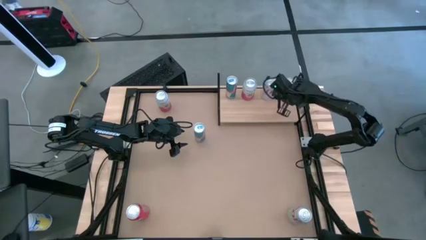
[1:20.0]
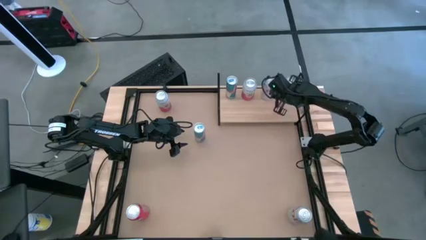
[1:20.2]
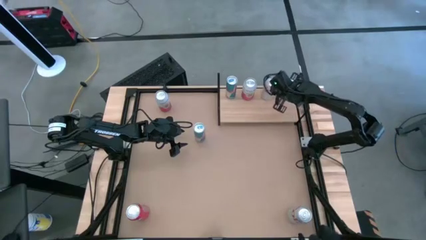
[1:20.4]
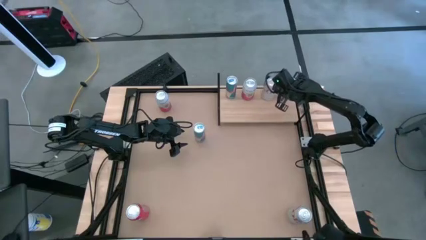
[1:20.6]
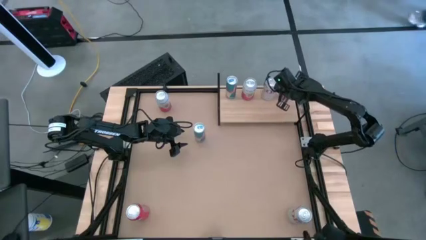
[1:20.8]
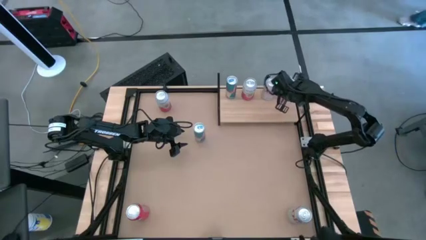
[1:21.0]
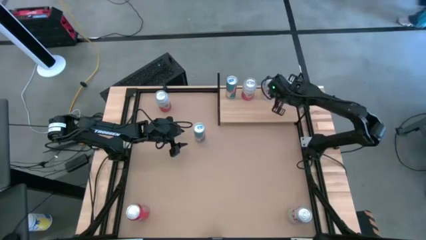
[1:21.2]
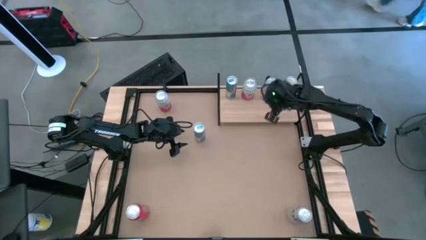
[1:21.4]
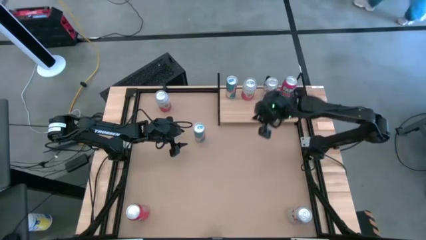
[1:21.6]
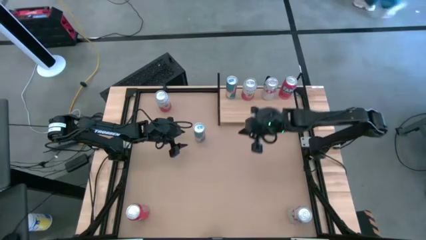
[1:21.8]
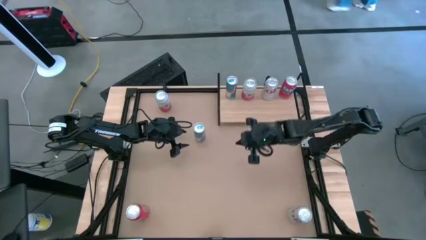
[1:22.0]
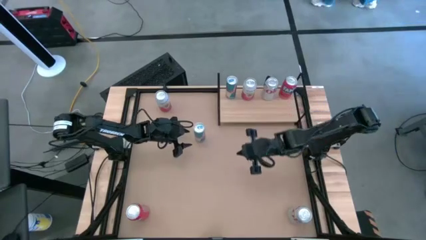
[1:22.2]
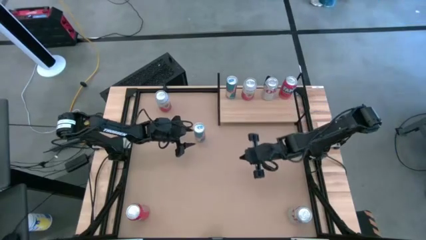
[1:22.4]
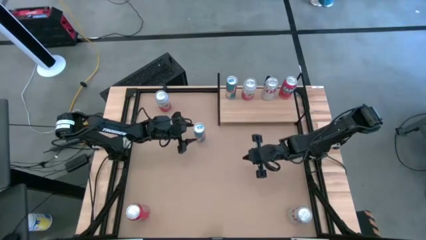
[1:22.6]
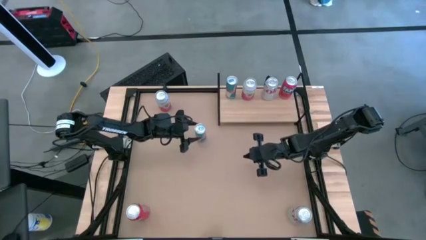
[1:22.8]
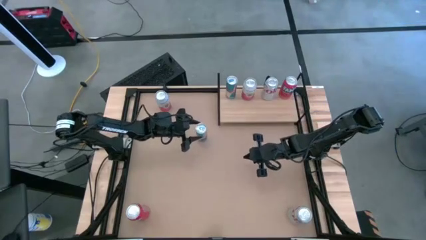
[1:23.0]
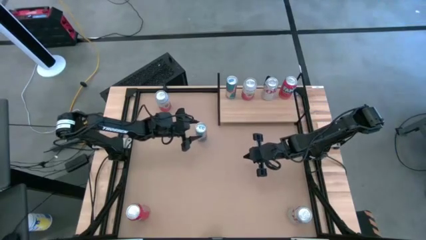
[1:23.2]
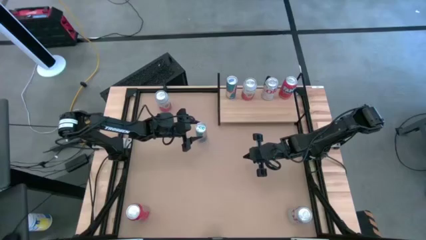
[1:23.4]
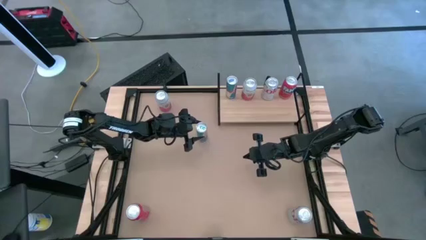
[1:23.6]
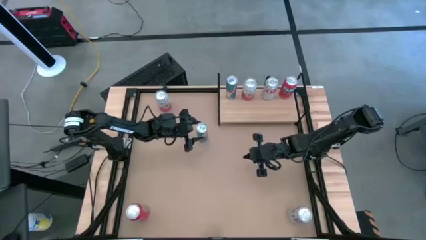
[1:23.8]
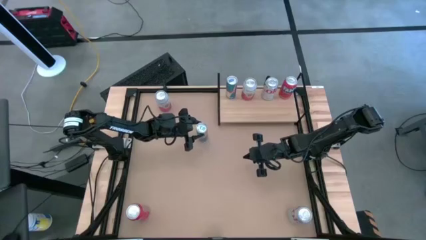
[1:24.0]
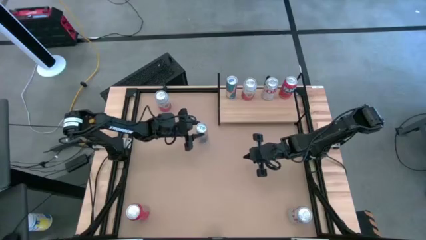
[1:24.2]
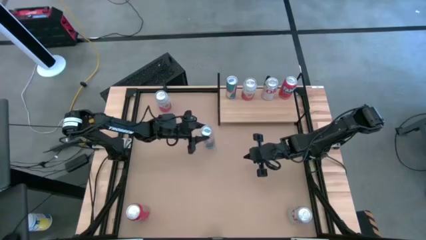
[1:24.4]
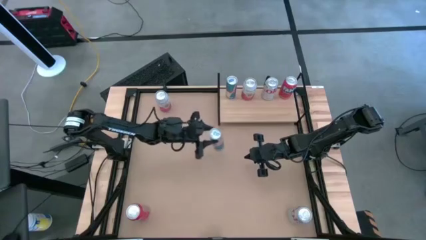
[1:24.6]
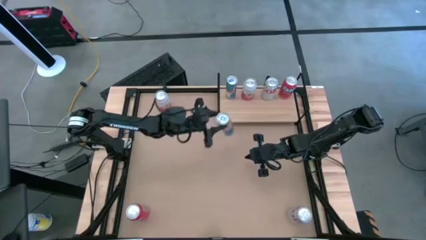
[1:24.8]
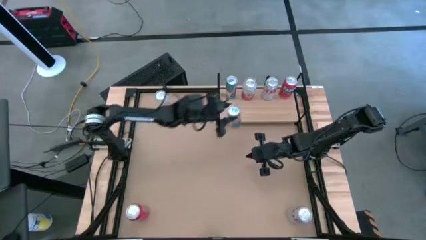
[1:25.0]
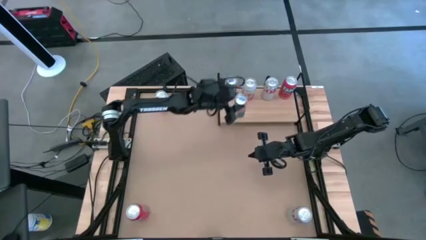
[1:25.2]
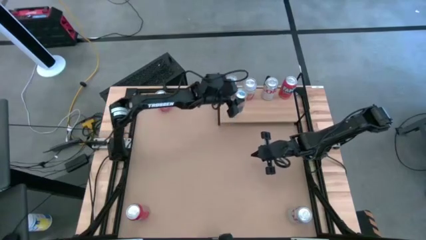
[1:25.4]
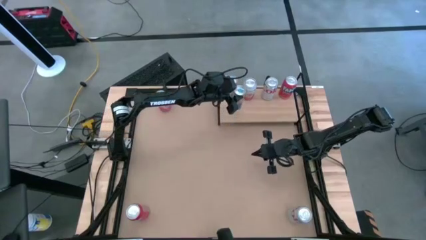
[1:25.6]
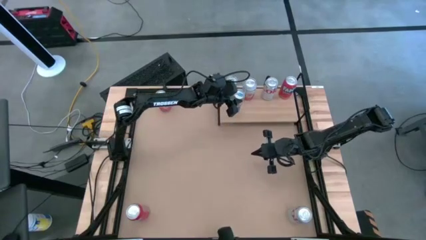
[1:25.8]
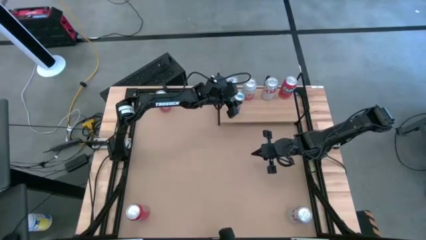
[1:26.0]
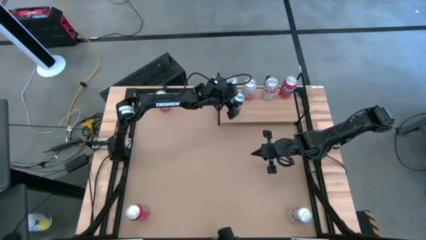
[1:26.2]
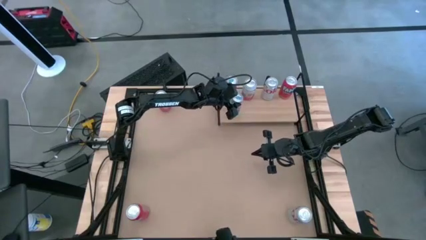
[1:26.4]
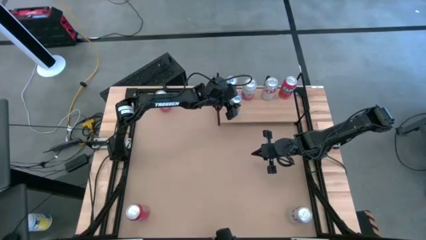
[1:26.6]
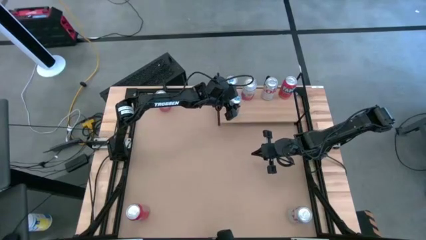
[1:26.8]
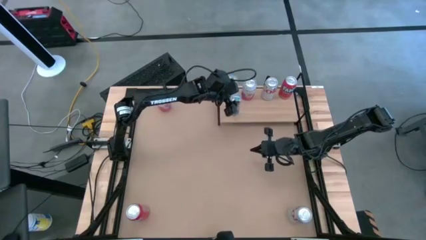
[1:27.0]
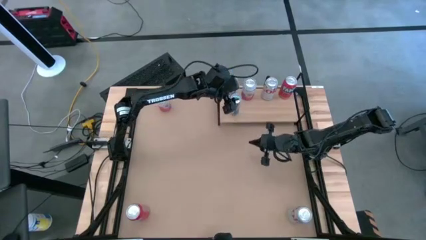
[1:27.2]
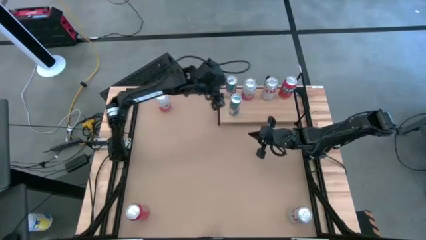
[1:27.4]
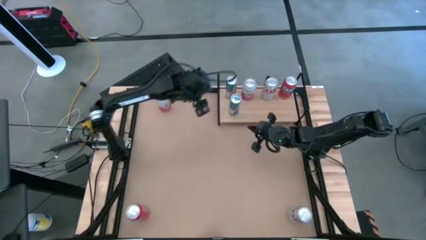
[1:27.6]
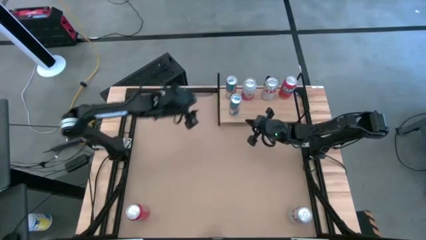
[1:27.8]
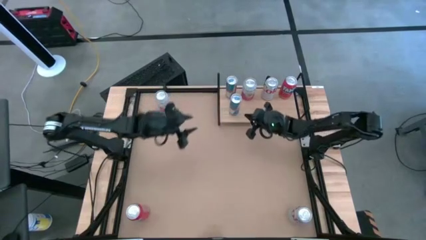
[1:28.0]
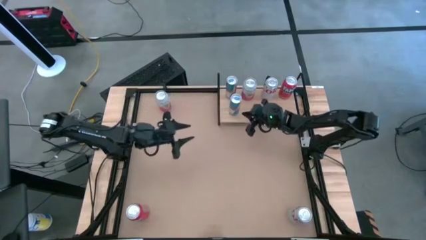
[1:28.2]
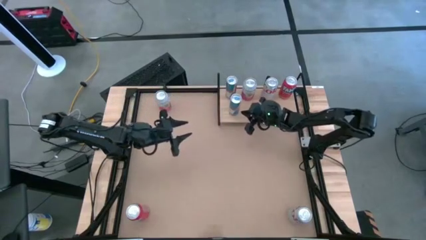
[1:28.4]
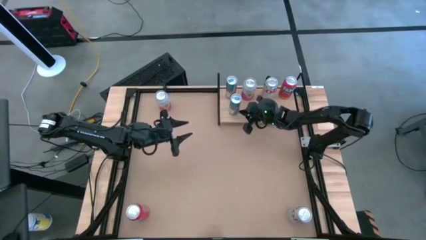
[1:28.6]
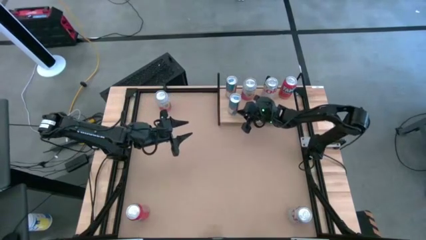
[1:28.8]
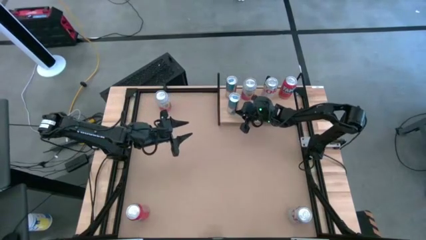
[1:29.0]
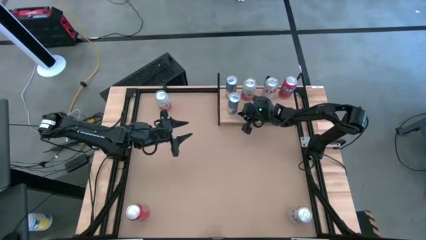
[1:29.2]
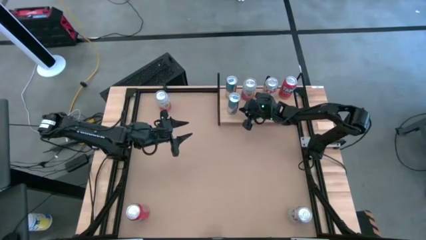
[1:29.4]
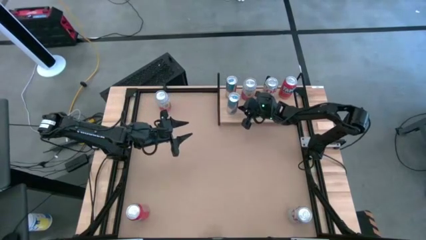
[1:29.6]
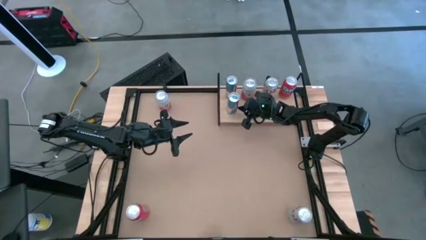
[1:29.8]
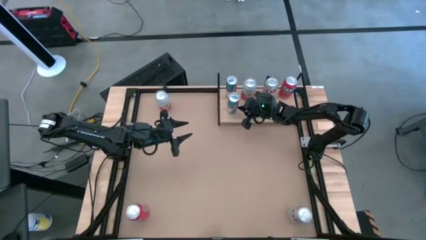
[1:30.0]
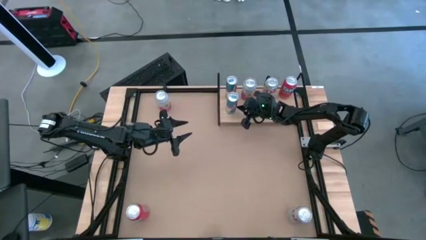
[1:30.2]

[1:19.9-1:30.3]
Task: Place canned beverage on shelf
Put the white and blue soda can on the shelf

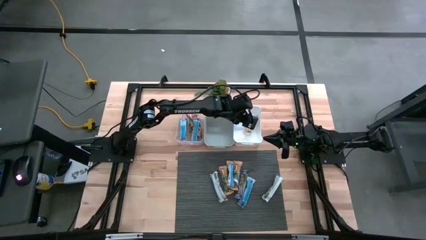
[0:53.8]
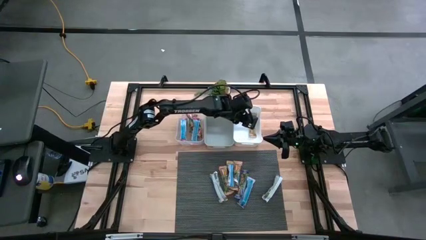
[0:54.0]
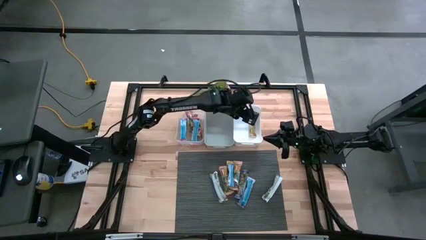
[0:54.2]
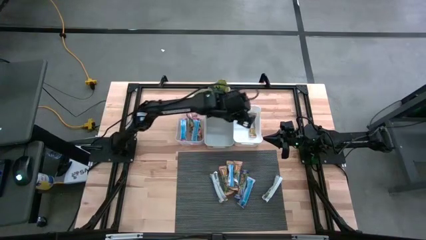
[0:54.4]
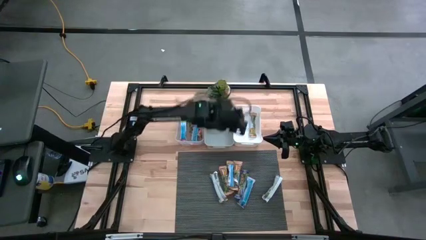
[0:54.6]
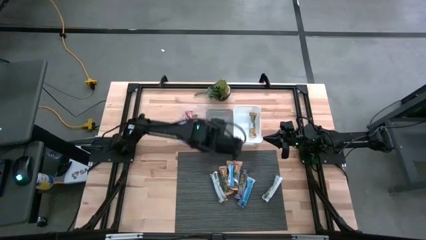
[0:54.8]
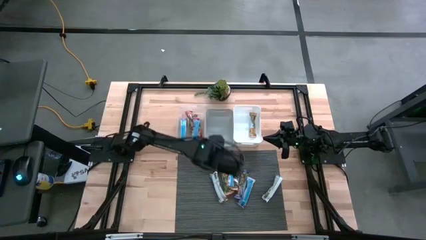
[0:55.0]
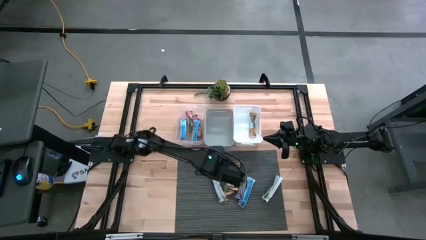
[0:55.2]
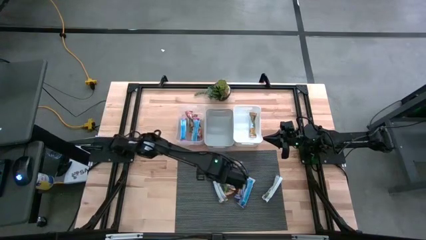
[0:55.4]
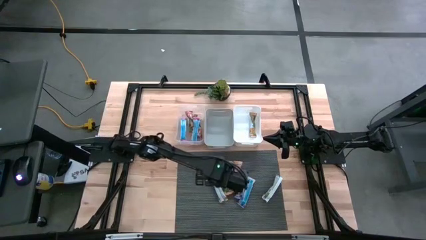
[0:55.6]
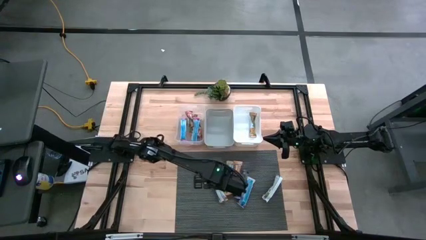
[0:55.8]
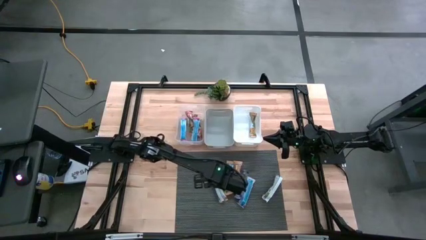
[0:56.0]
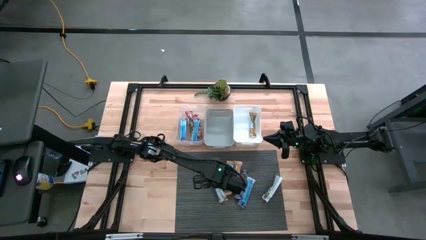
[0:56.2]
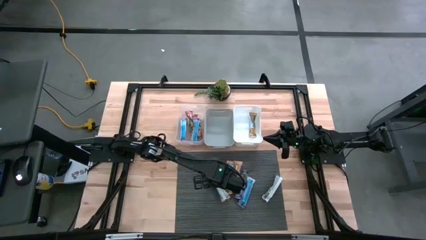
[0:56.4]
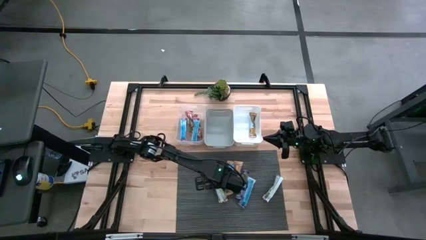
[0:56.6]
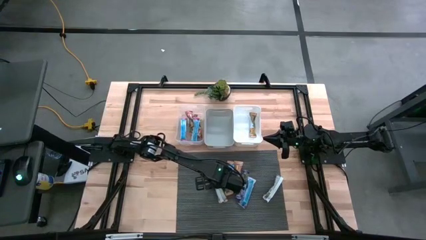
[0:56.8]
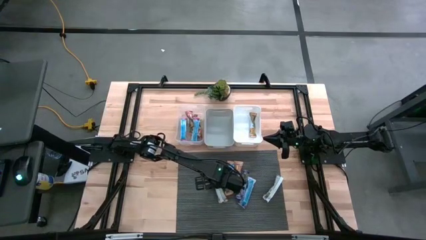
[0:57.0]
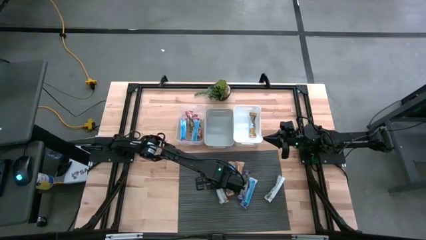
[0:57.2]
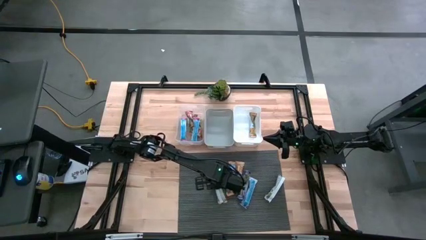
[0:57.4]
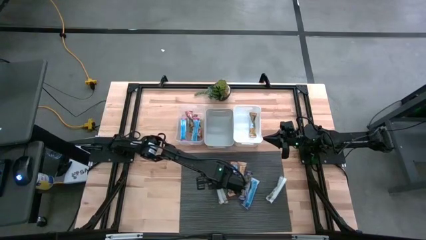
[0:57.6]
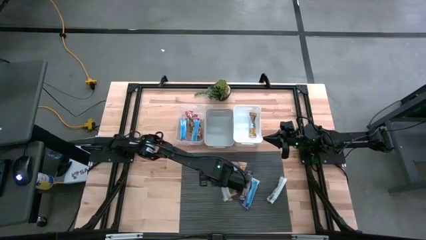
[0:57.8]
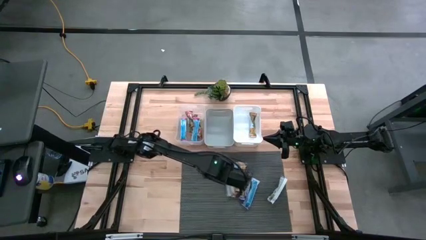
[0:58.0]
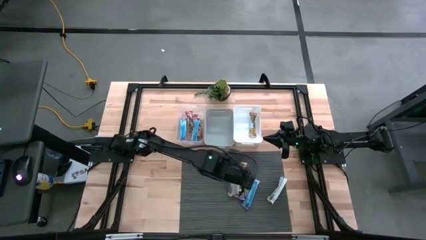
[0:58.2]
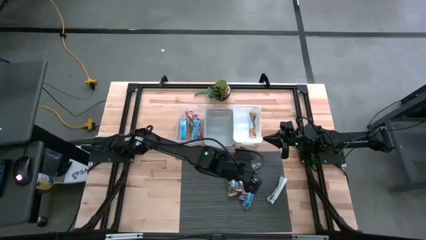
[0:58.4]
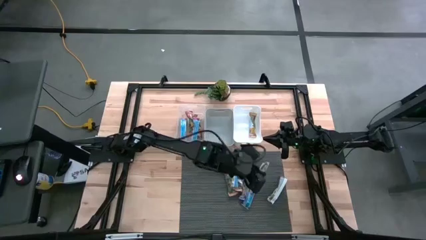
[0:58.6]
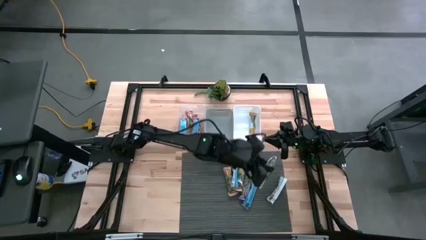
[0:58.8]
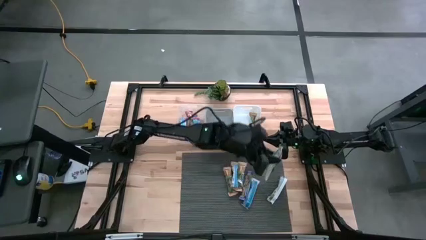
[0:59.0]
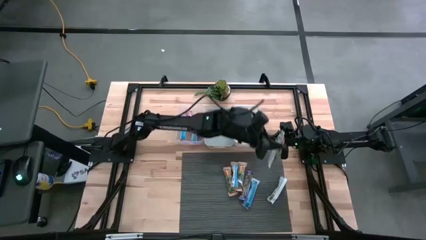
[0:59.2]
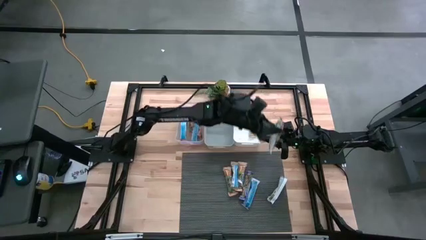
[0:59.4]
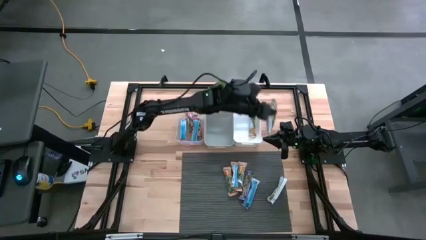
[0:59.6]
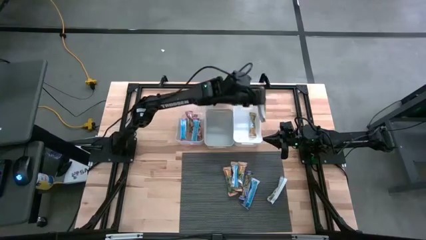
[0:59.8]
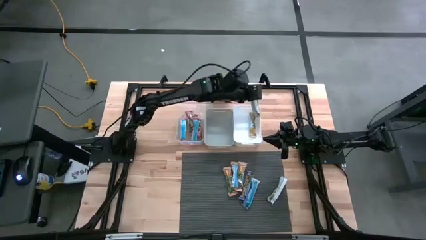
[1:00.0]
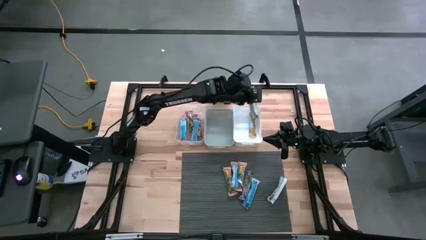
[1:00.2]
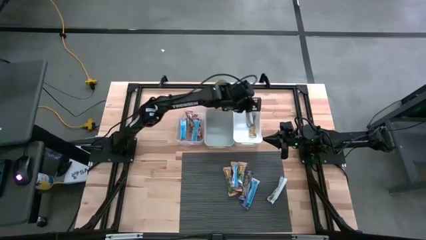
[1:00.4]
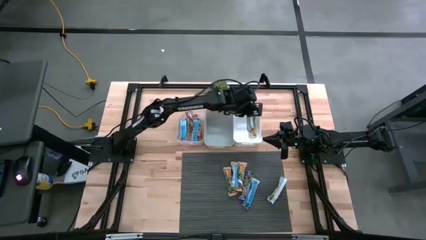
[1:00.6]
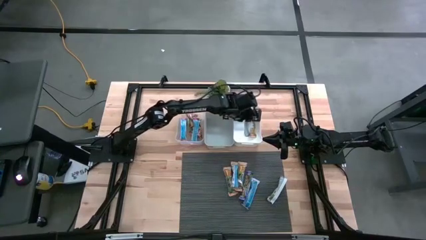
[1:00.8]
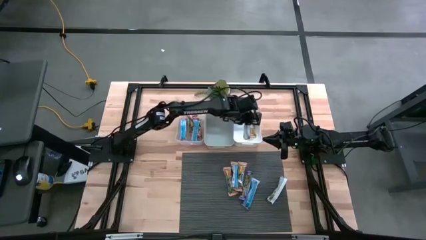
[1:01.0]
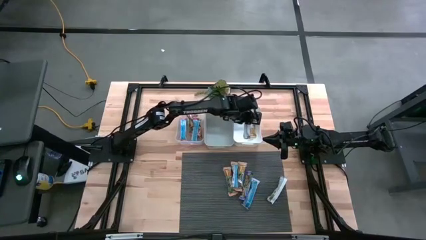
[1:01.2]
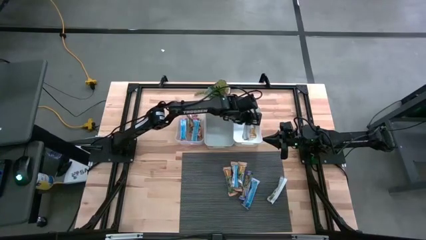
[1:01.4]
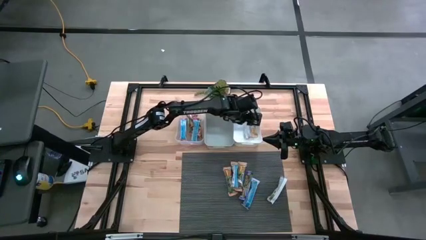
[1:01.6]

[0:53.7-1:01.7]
Task: Pick and place Granola Bars by type
Put the yellow granola bar into the white bin
